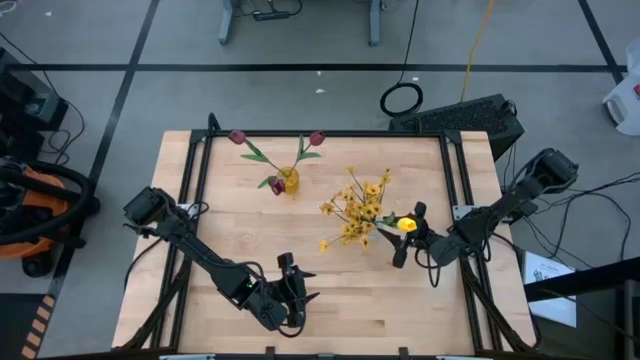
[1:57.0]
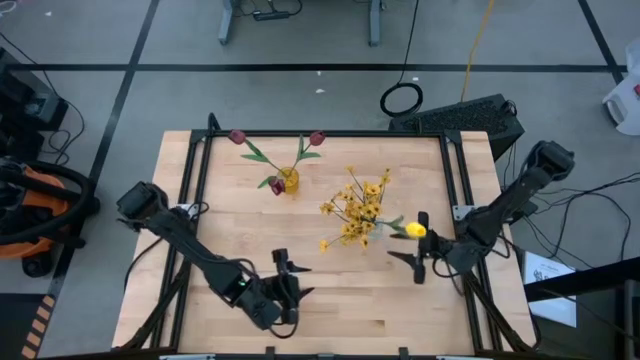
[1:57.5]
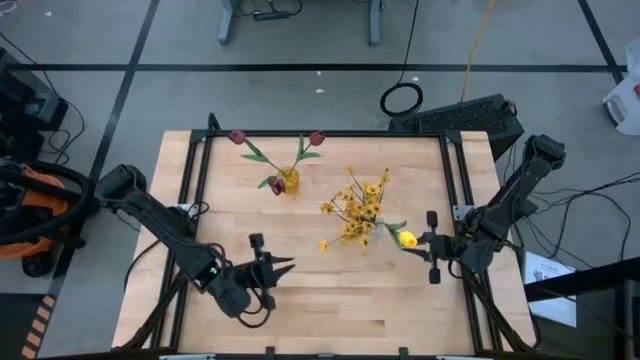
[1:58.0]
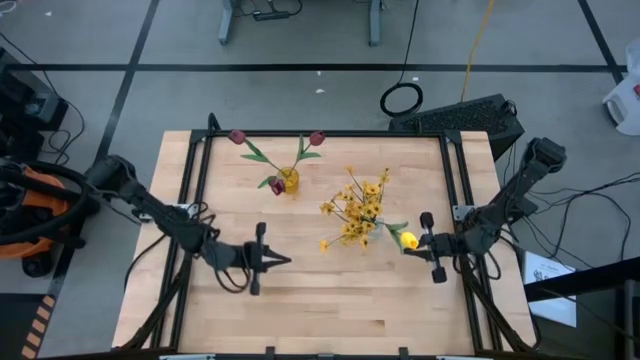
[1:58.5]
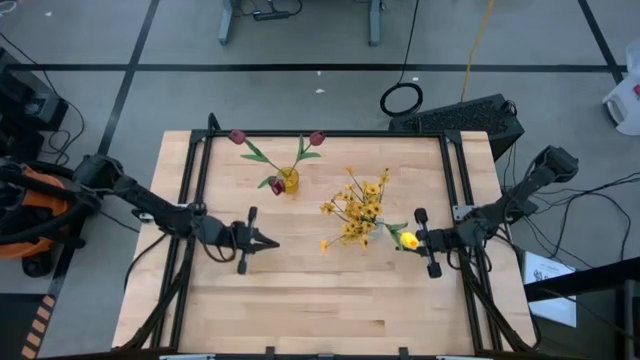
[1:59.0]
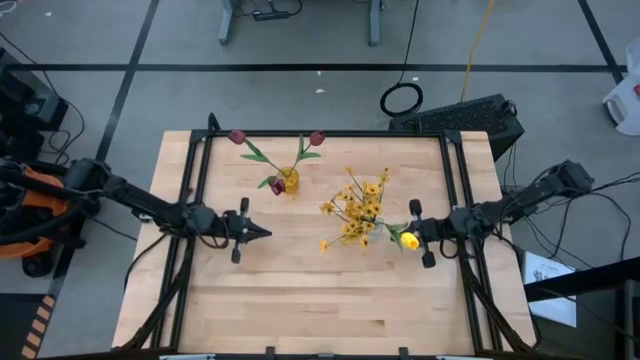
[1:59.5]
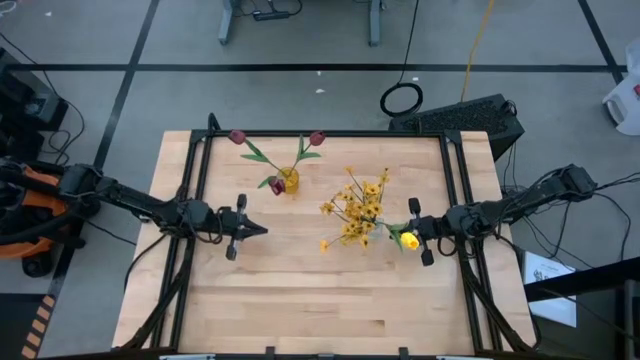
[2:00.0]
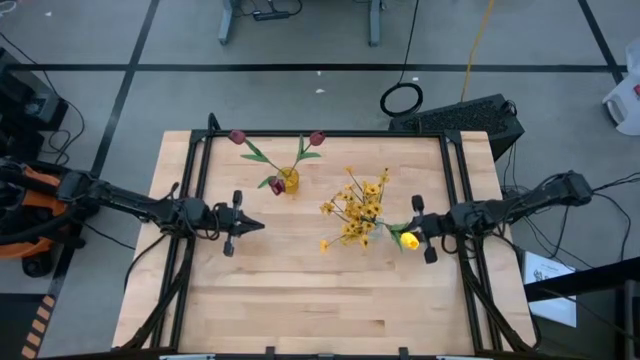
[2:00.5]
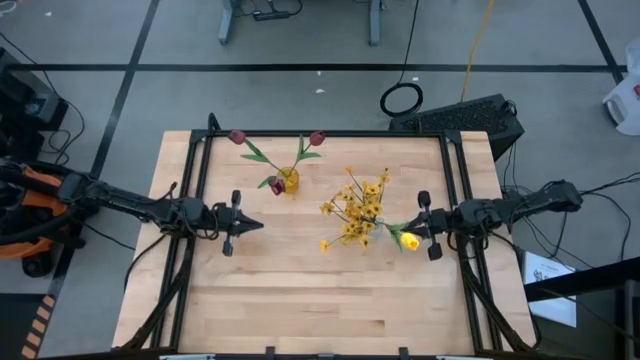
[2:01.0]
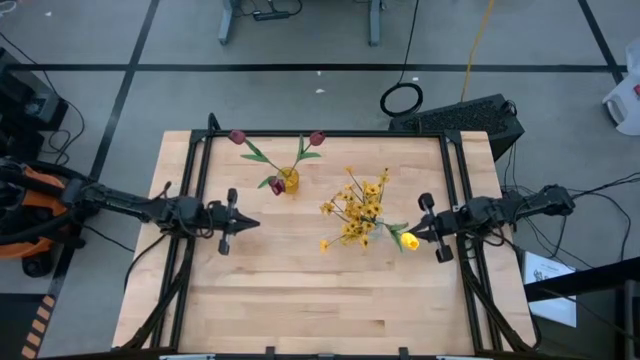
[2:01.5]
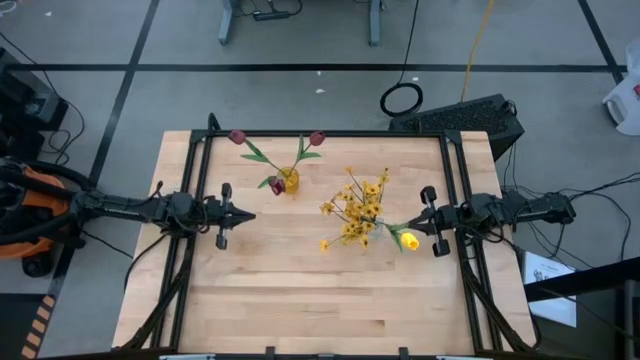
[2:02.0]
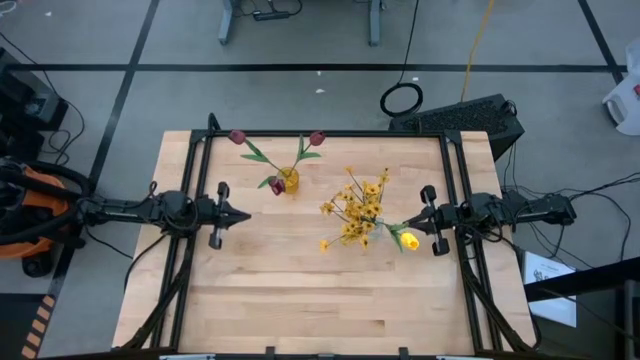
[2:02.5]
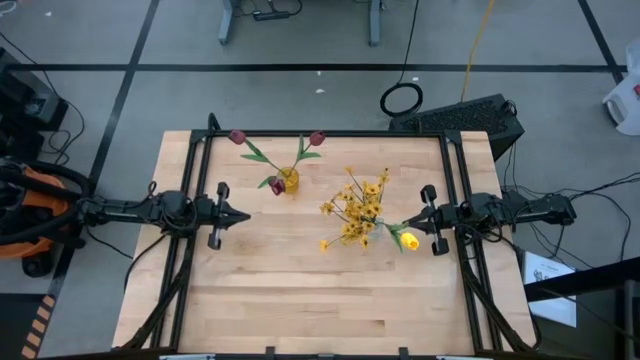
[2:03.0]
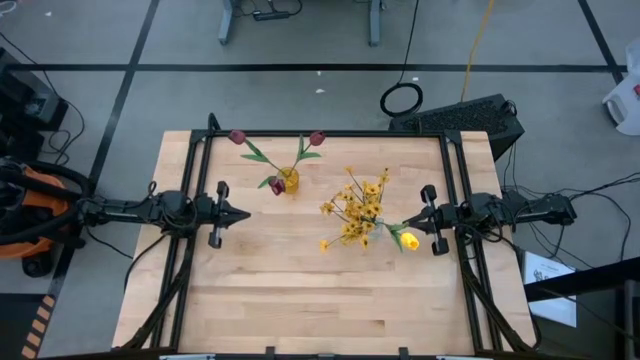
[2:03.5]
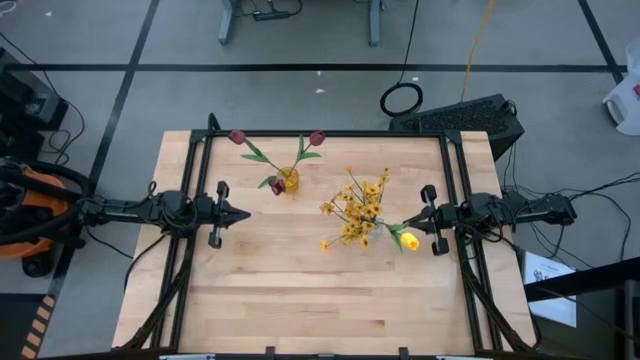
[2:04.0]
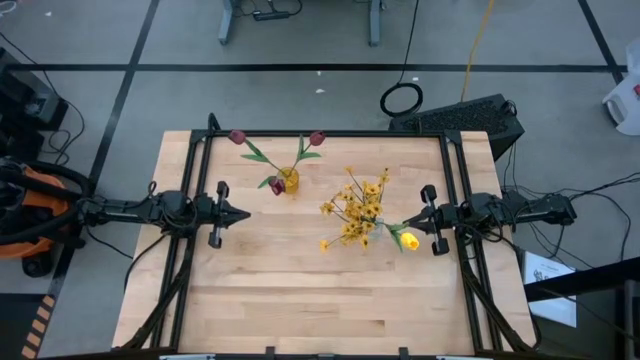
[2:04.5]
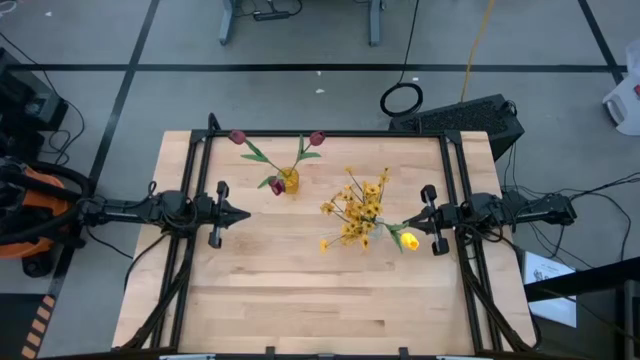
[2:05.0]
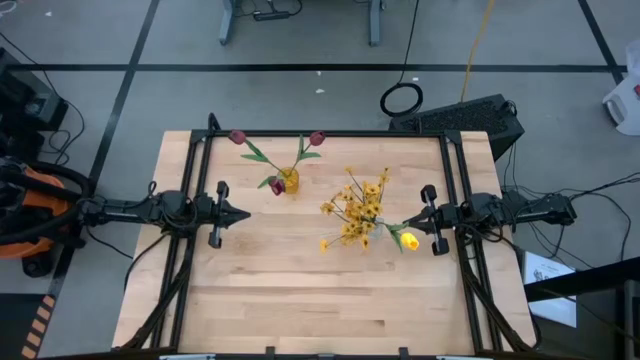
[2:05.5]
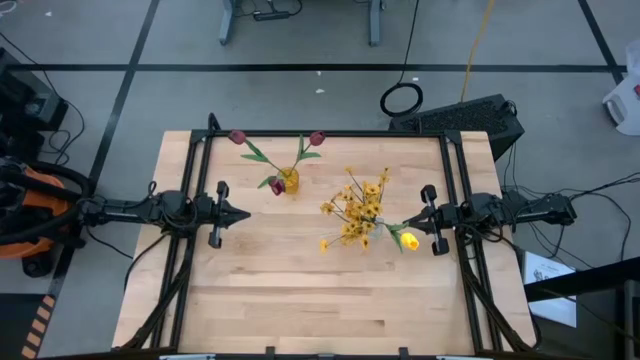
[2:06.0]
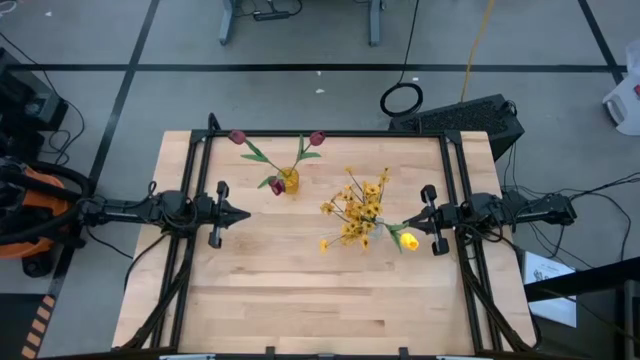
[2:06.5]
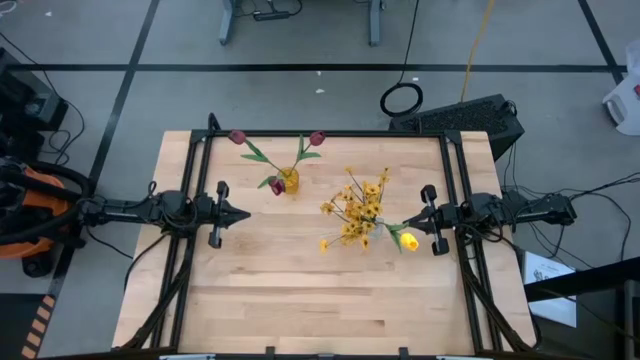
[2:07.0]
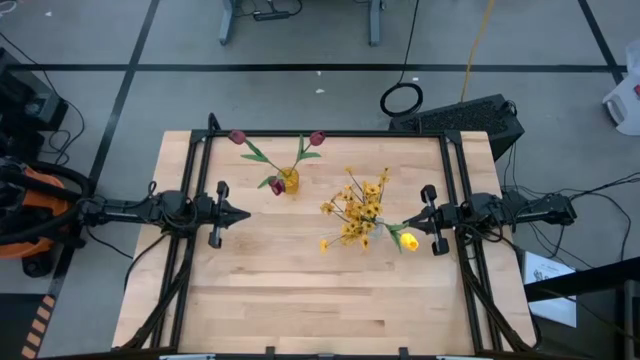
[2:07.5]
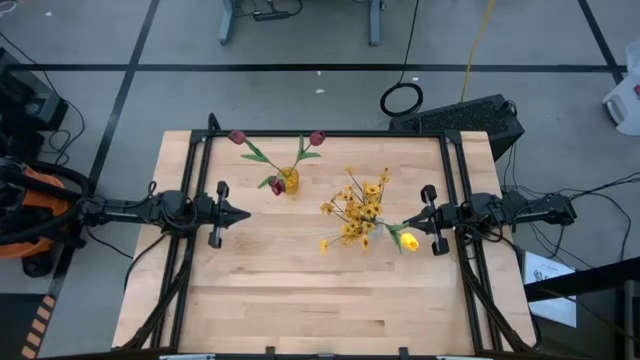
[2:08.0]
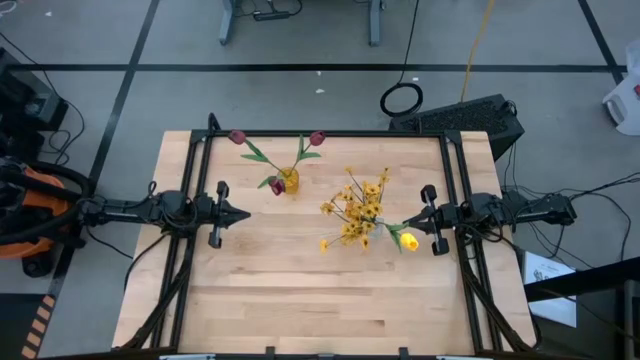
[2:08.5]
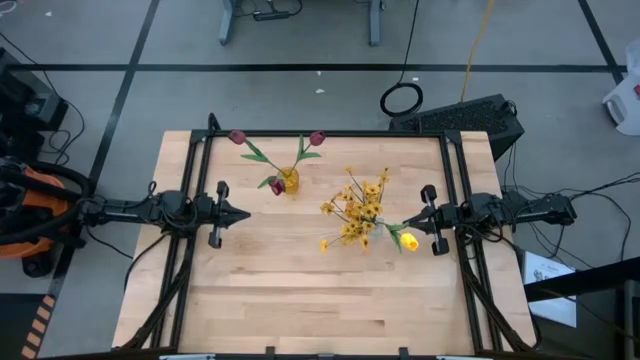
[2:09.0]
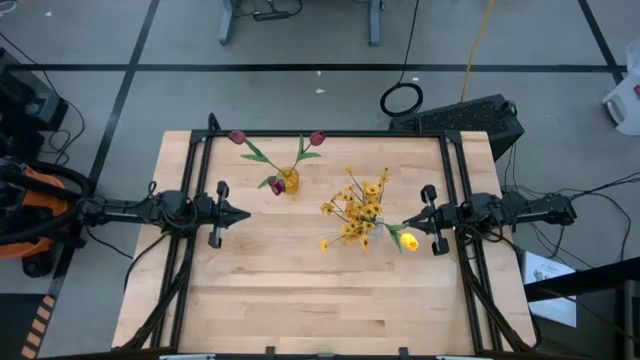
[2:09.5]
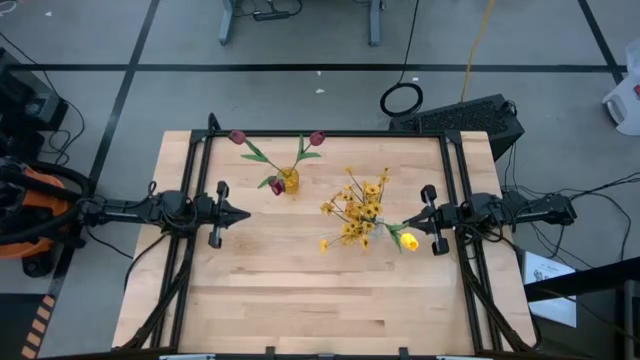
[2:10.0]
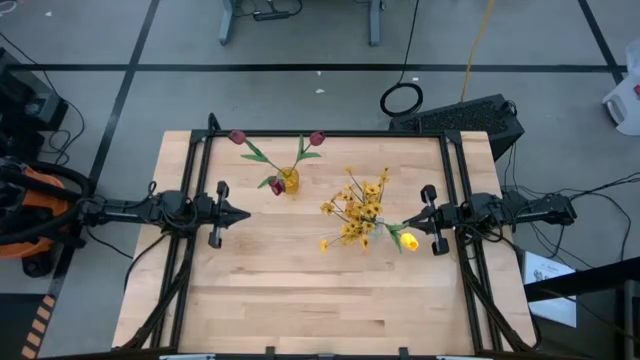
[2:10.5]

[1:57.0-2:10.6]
Task: Sort flowers into vase by color
Return to Home Position
